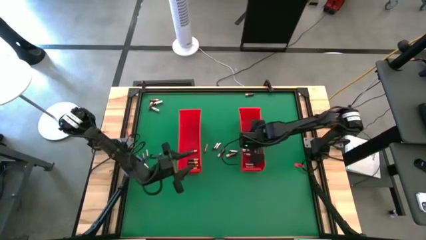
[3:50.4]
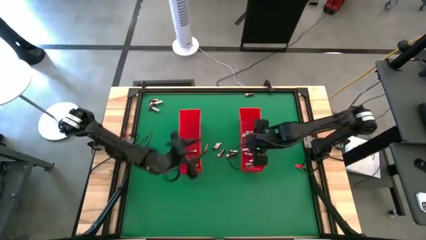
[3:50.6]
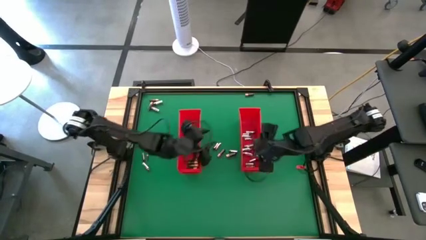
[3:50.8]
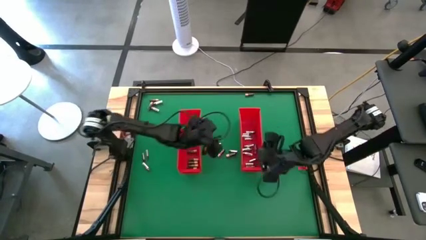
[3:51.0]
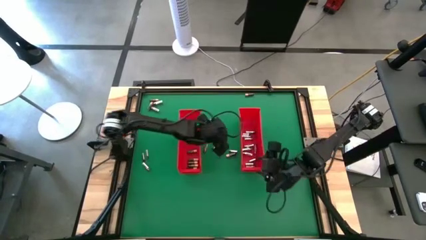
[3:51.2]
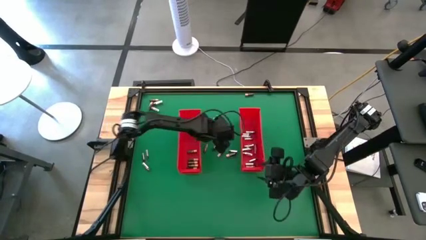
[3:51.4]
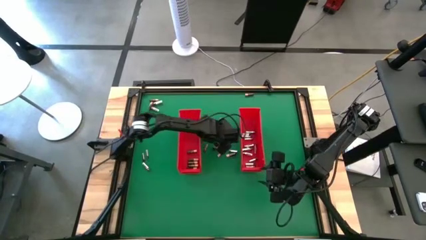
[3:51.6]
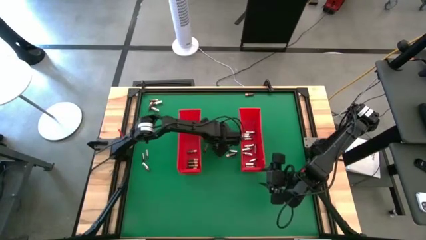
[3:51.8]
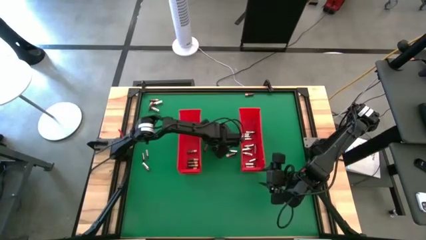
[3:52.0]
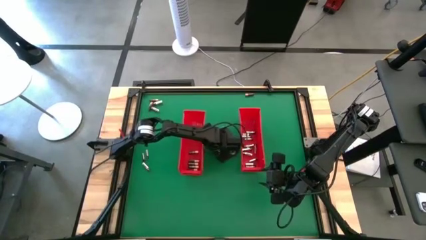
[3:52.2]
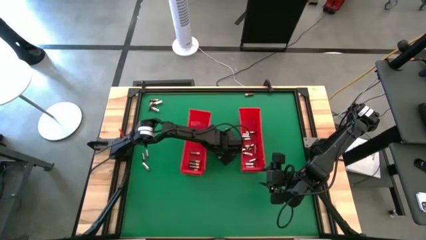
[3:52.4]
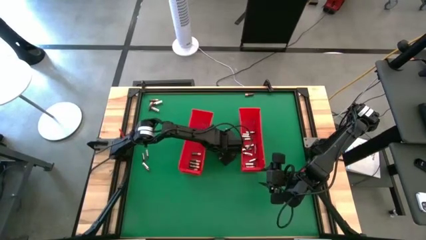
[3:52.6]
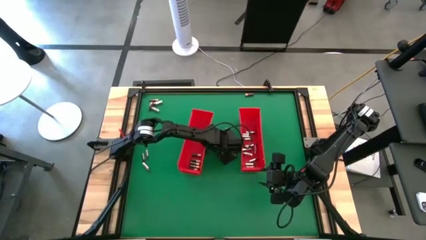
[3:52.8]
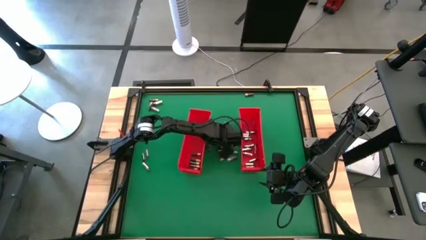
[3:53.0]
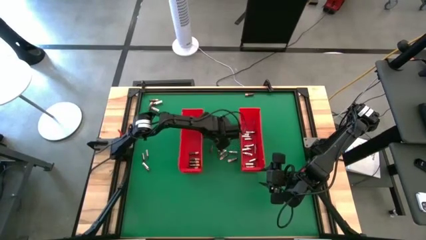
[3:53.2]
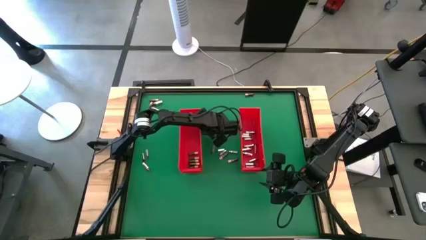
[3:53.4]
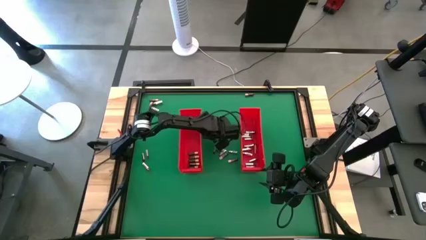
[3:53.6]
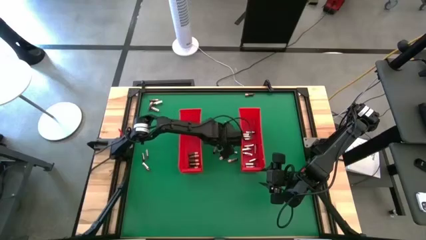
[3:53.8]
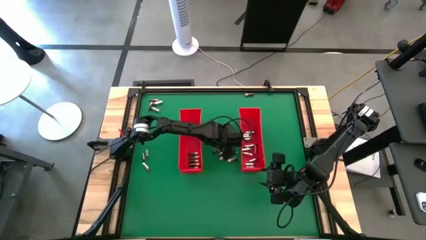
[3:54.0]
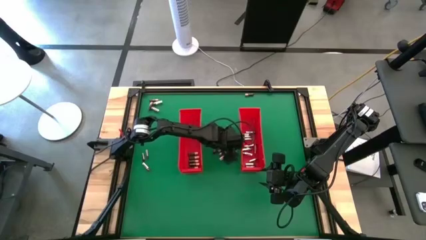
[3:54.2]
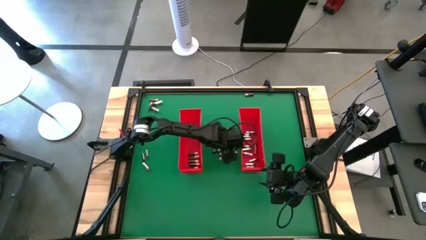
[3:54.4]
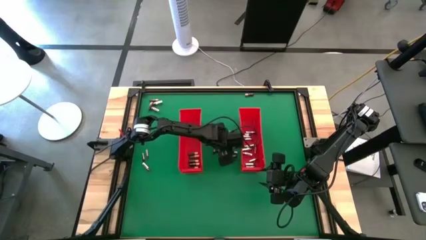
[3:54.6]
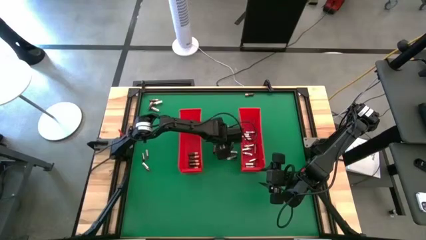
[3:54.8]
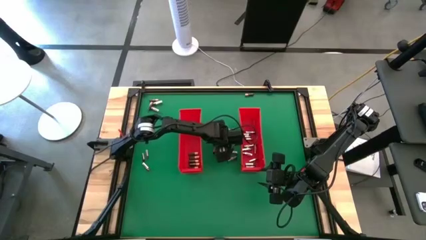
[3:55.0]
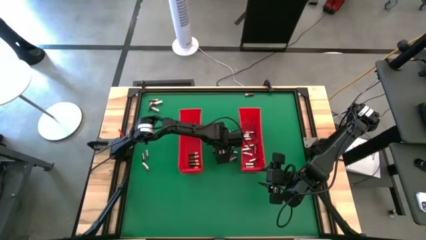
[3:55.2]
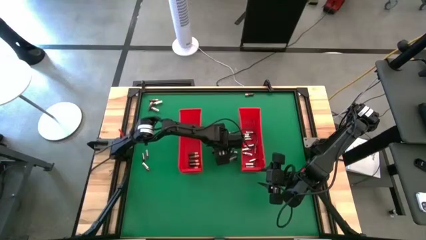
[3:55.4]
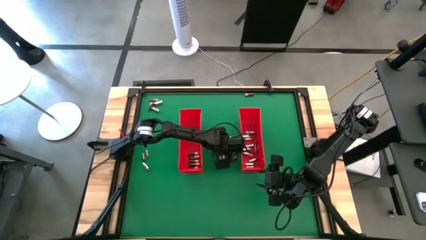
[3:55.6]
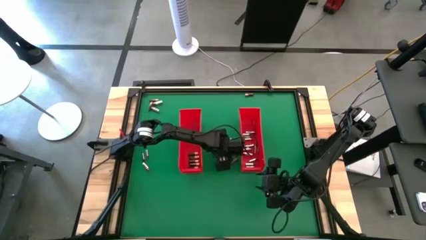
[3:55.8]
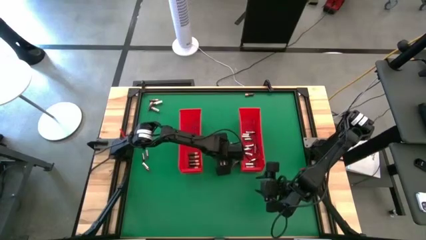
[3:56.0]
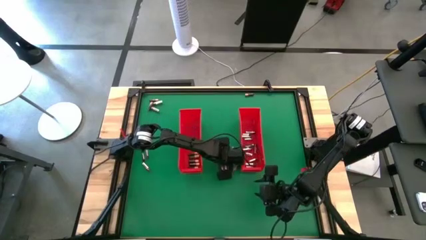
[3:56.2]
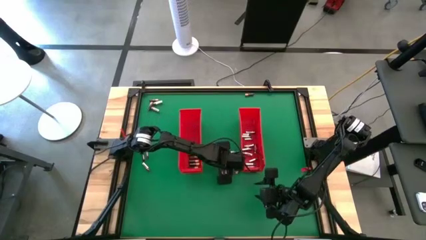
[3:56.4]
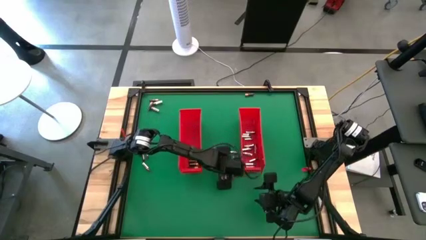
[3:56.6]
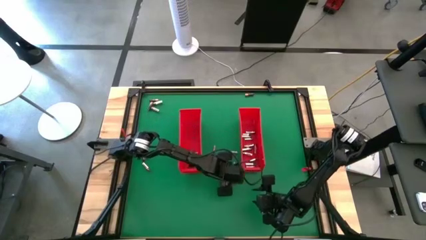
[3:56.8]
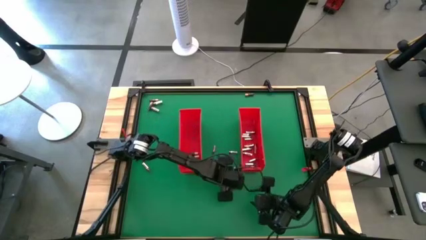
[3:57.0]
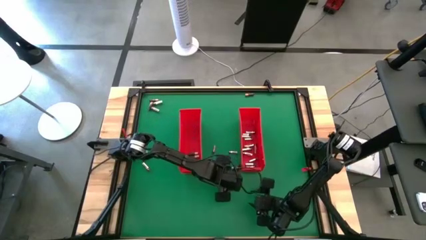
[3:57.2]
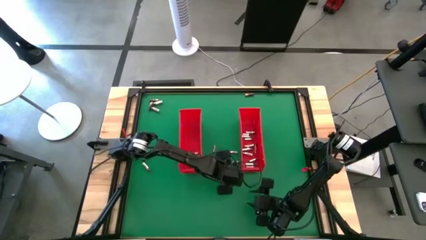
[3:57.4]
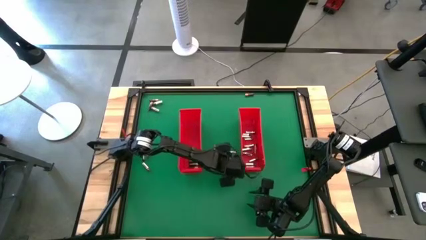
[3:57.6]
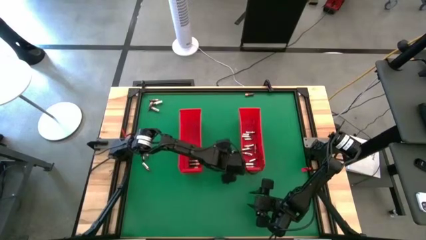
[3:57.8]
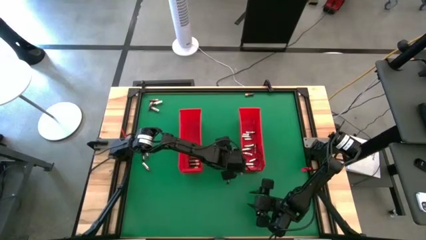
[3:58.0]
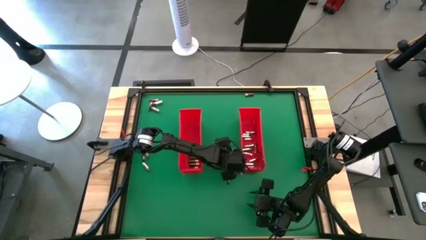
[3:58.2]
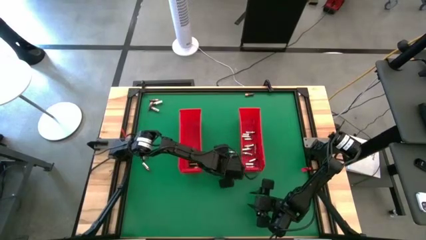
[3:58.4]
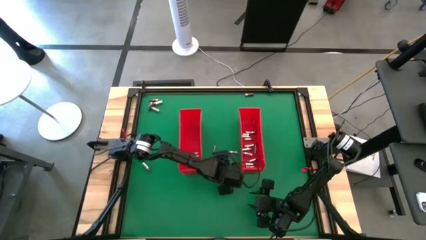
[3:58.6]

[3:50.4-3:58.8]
Task: Sort batteries
Adjust the batteries on the table

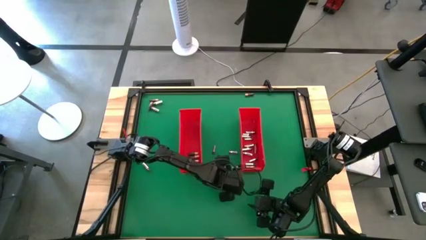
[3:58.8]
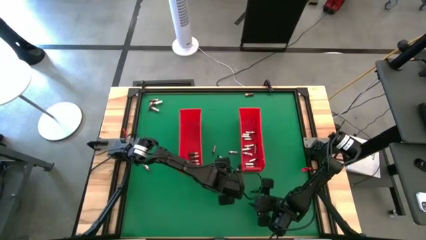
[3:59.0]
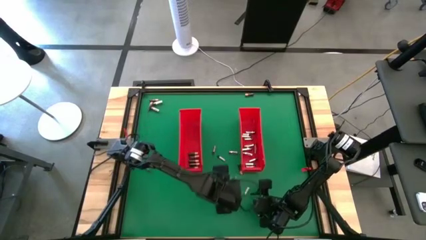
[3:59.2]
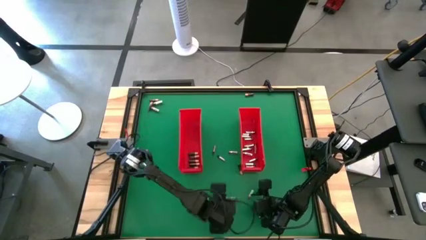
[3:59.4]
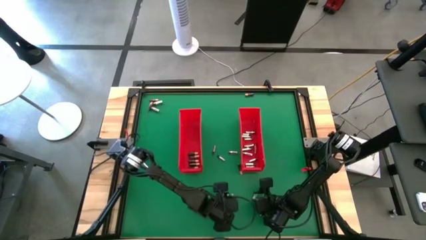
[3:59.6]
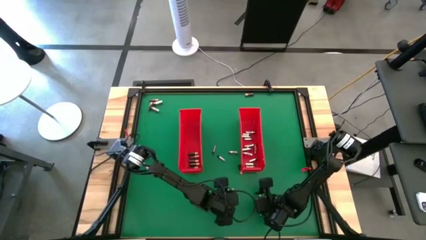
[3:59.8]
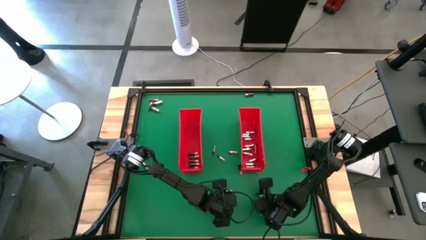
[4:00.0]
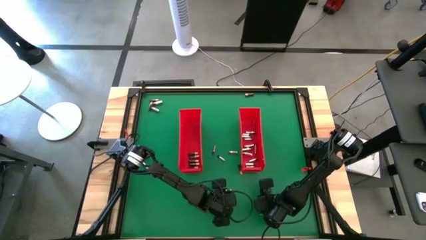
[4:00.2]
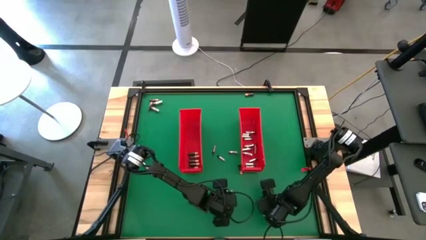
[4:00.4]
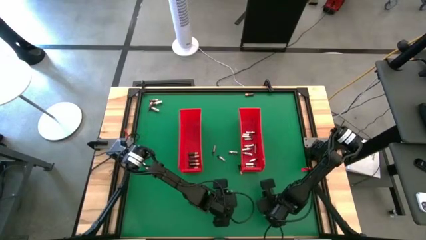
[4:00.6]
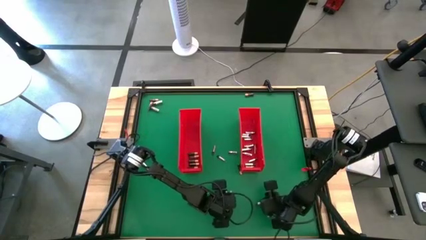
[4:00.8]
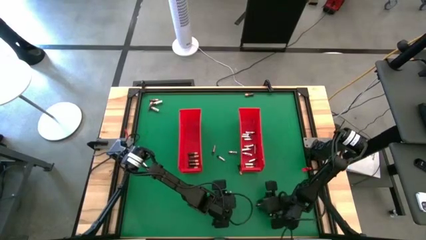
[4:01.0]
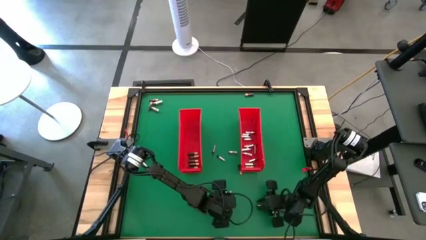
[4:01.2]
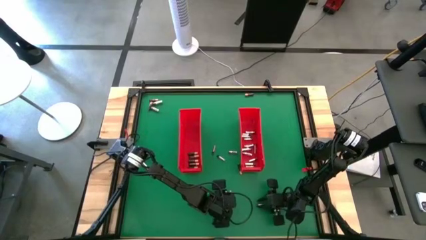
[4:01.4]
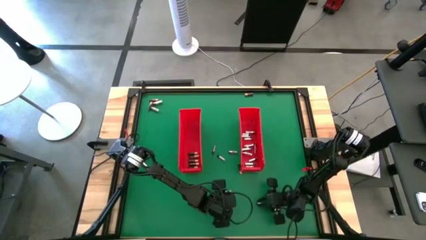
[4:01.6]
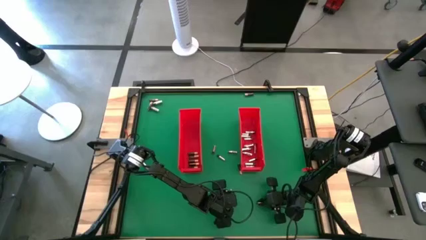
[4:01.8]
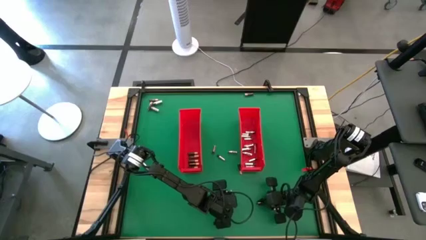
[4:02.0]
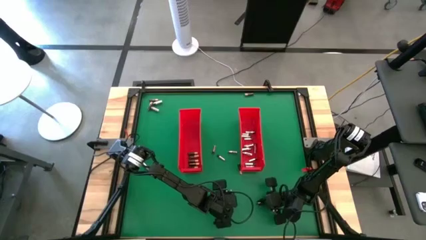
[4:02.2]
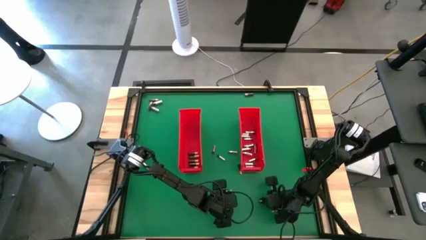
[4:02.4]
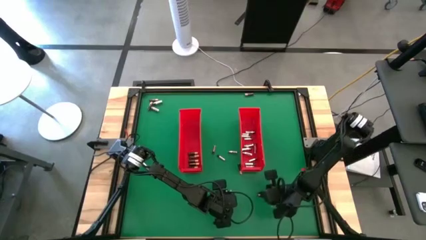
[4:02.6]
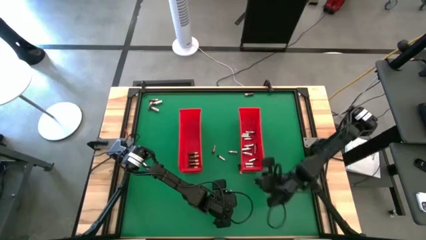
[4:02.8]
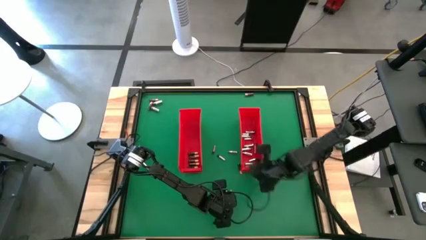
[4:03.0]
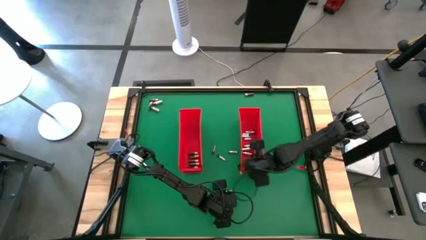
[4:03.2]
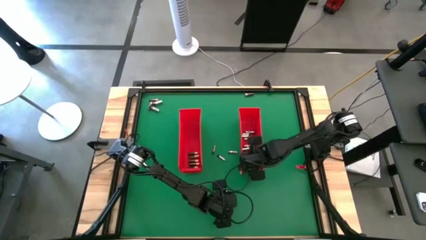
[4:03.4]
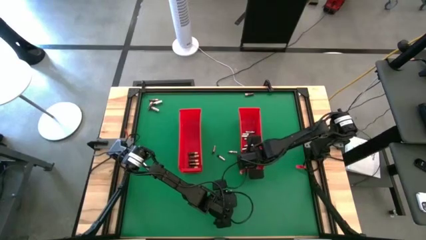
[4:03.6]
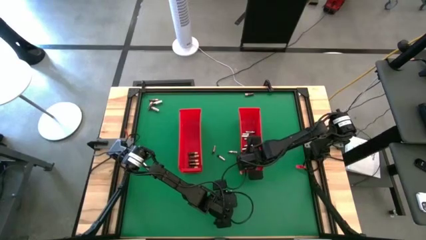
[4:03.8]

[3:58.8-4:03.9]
Put the silver battery into the right red bin

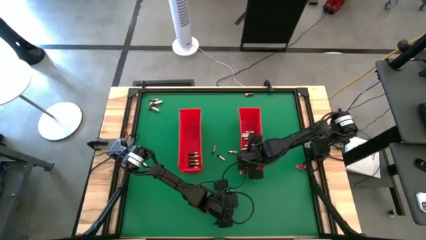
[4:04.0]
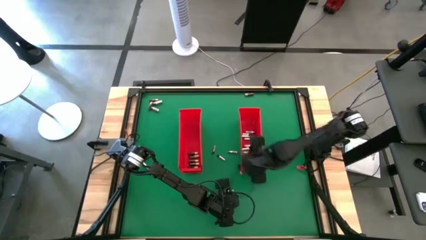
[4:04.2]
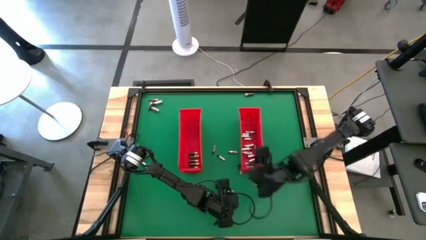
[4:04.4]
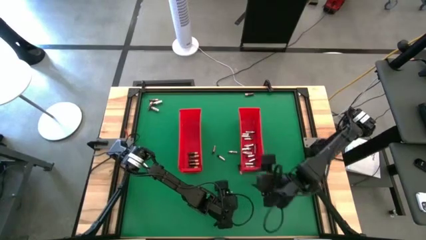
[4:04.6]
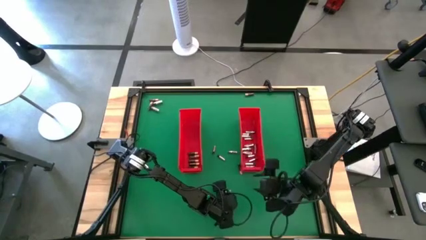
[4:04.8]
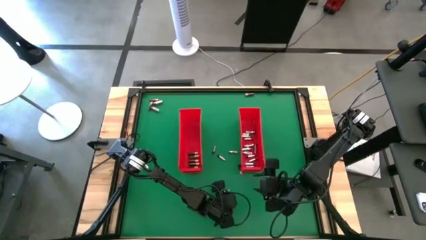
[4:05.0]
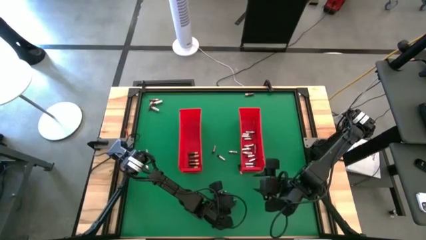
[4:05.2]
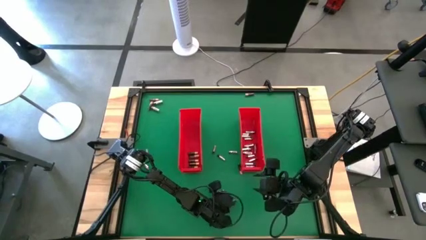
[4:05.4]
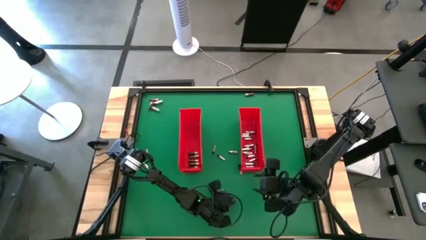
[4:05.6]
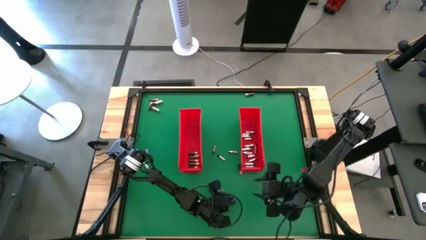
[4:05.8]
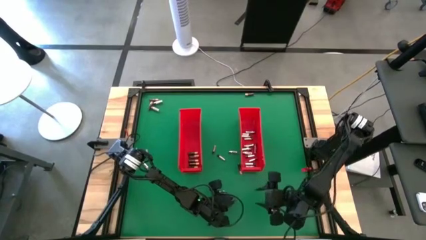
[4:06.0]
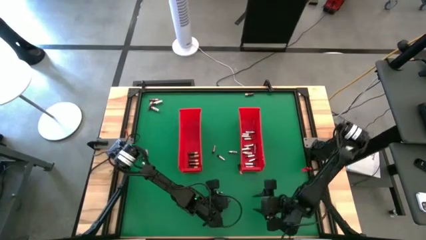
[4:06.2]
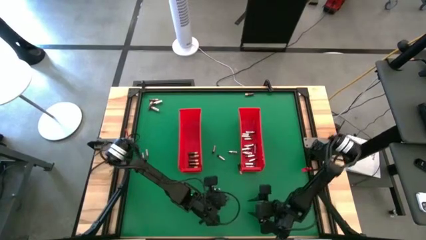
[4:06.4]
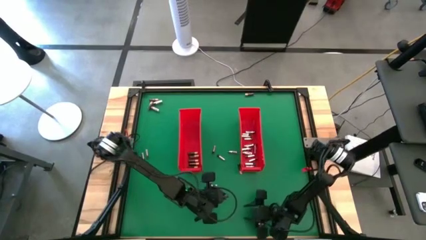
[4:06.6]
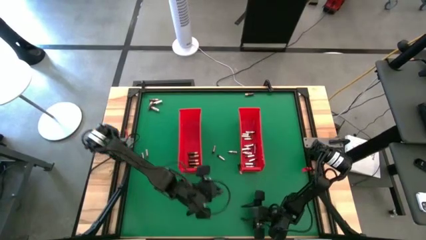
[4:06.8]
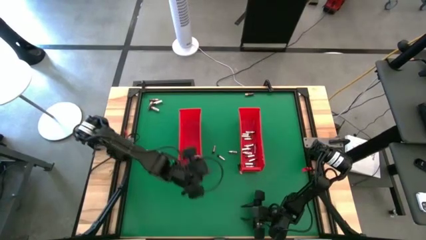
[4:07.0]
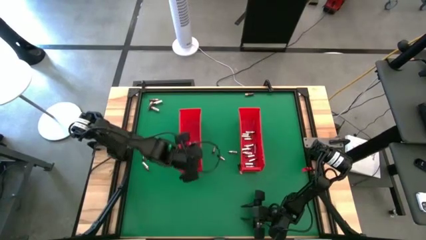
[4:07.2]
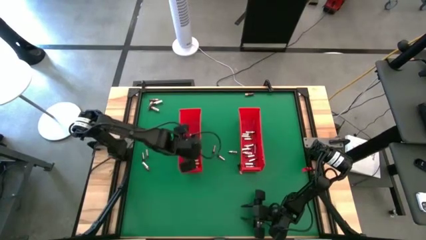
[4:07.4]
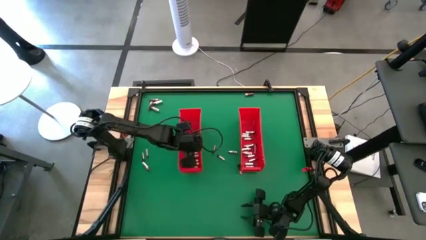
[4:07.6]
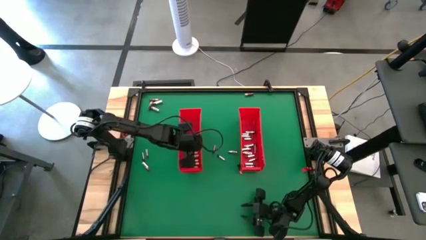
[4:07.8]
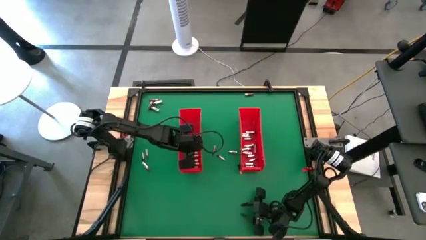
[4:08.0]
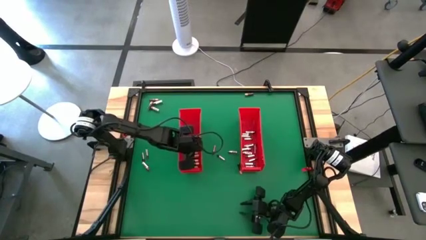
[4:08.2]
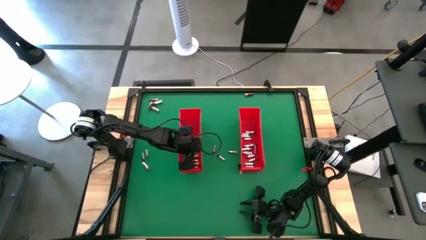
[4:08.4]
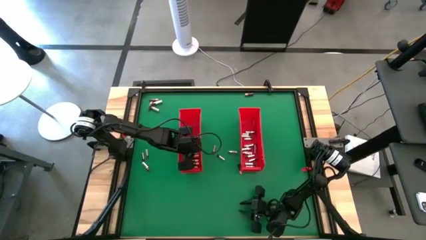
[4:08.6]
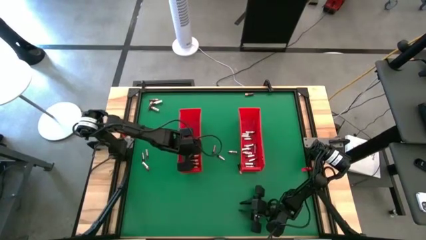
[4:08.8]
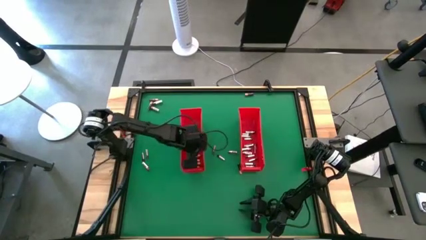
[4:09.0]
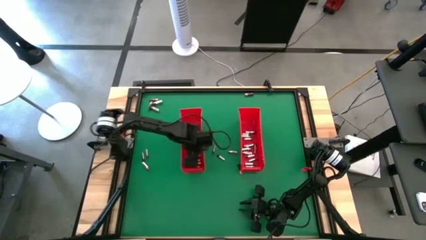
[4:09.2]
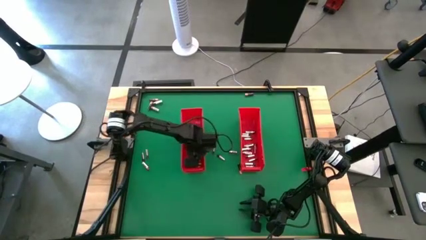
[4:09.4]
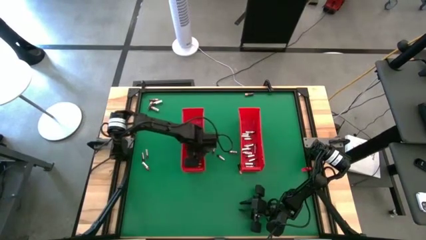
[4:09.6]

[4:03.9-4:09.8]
Put the brown battery into the left red bin
